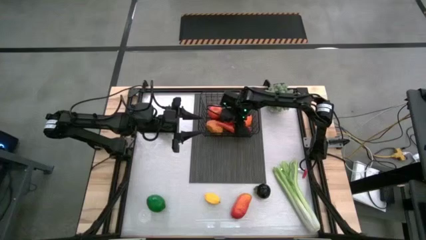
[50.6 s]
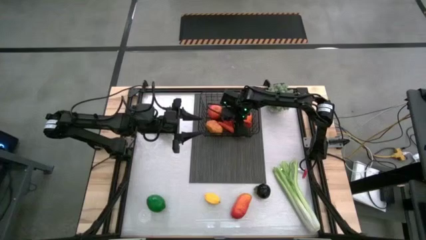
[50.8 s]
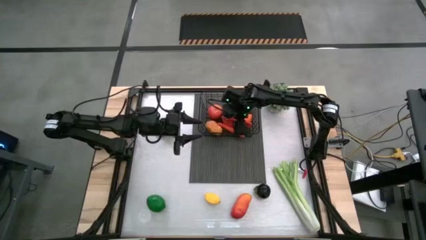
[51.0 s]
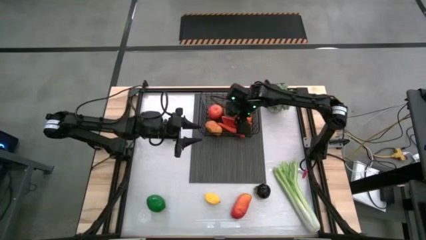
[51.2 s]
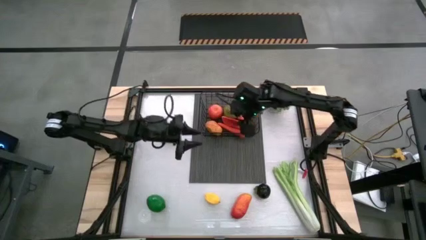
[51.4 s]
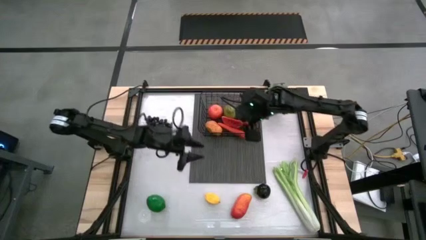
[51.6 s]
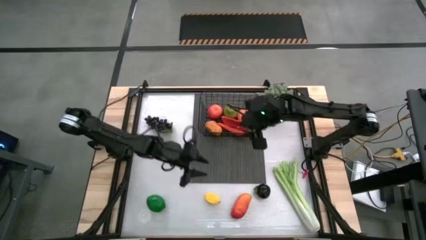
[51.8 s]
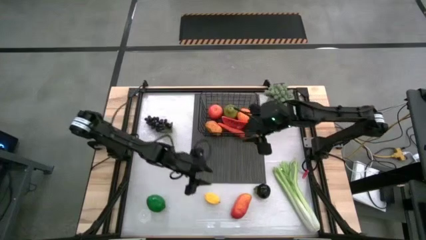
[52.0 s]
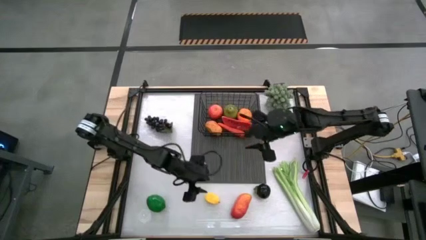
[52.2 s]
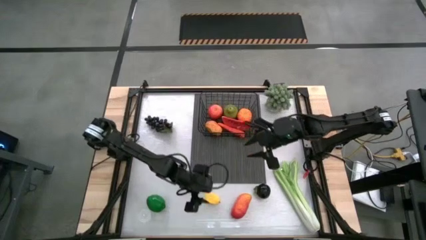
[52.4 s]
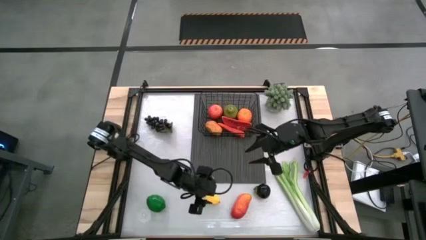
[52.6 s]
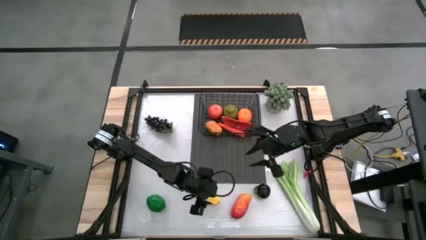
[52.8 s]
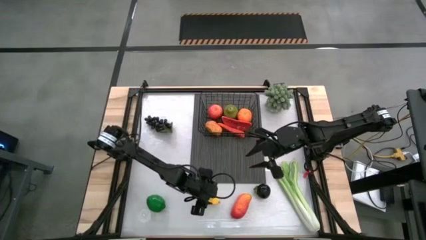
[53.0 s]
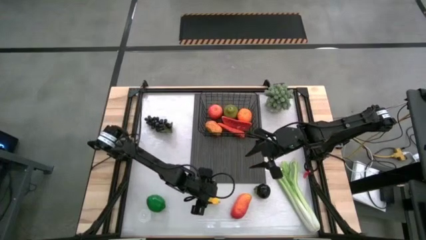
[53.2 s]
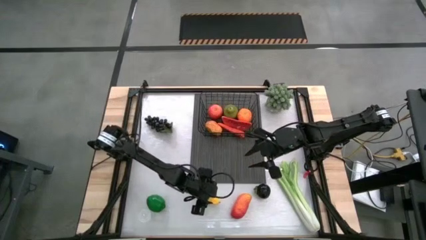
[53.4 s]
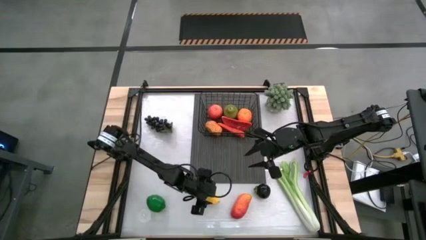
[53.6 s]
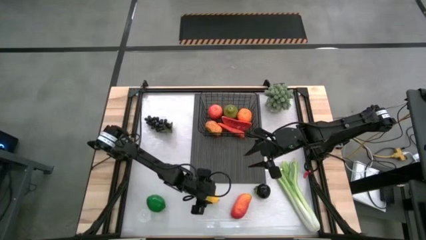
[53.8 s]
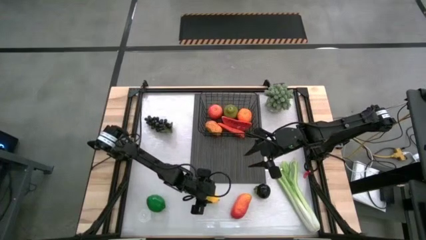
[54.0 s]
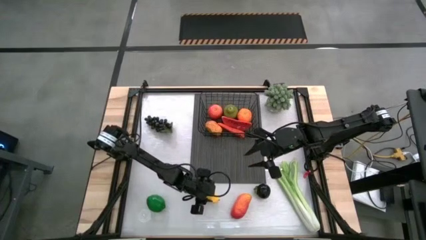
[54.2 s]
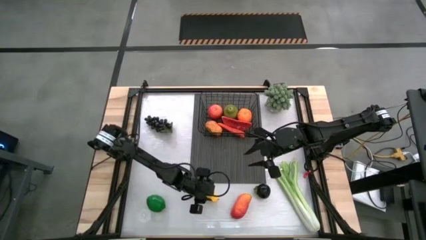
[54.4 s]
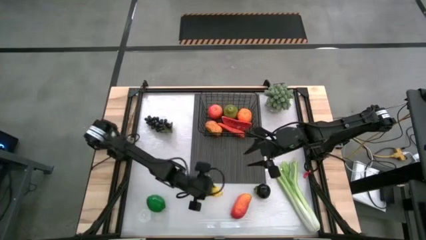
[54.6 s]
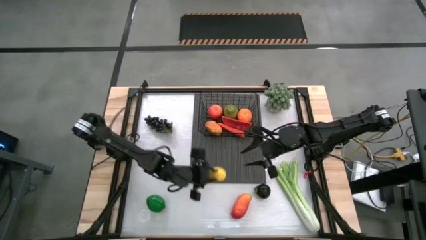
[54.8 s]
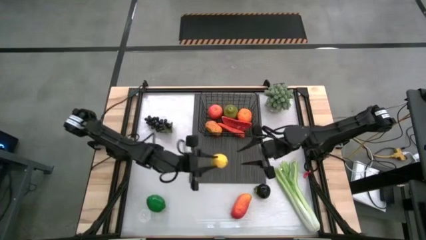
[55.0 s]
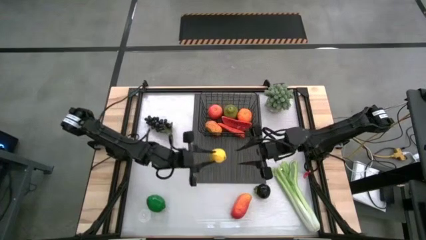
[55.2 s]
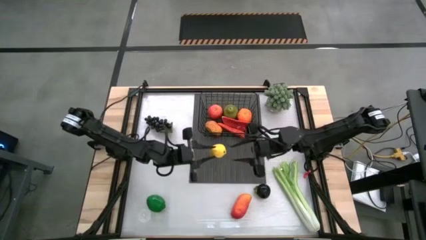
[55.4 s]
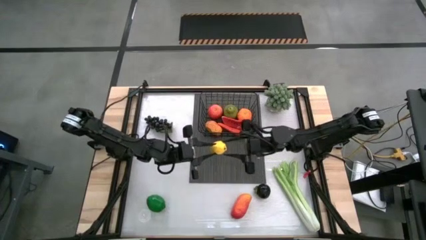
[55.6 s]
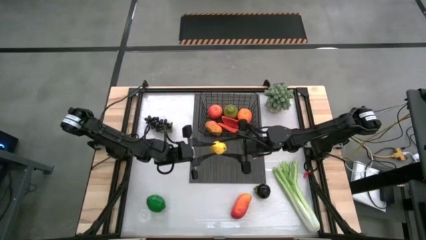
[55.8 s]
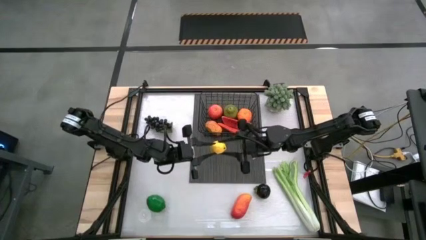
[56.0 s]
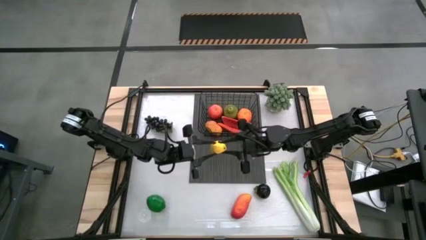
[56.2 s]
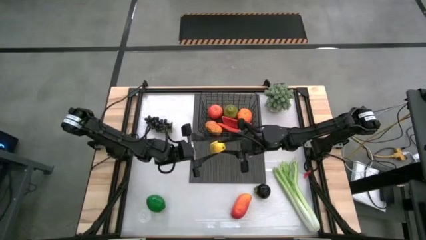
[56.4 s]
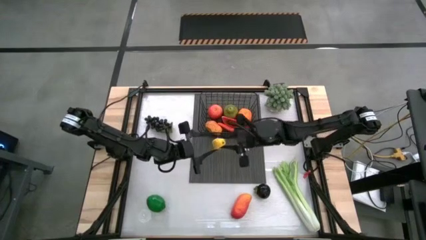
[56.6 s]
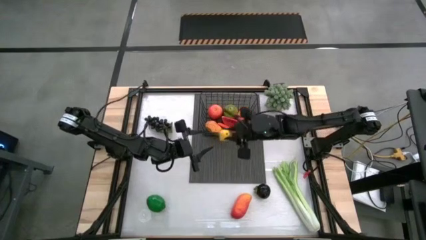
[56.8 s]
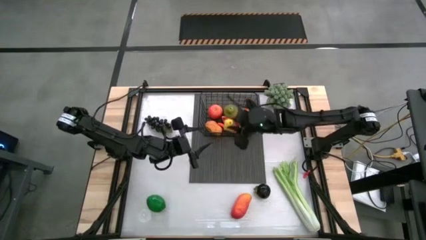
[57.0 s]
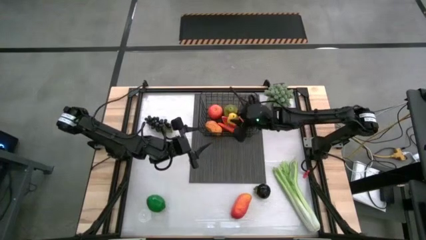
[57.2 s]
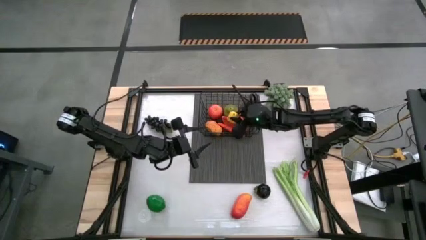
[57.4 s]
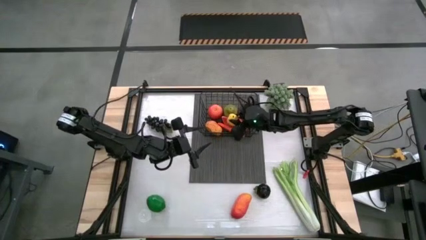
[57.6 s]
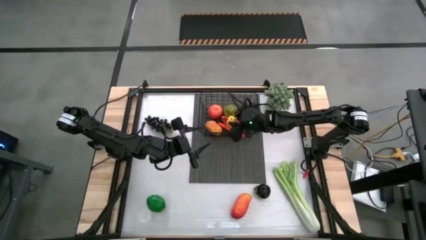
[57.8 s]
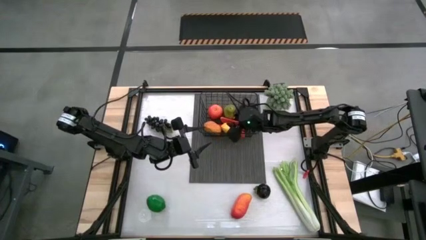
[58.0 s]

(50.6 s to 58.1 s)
Task: Build produce basket
Put the lemon into the wire basket

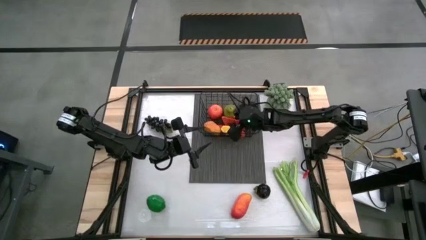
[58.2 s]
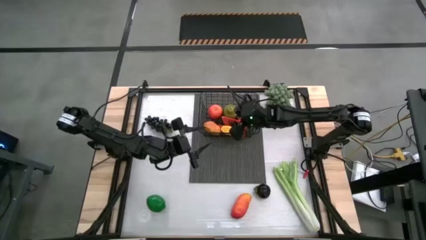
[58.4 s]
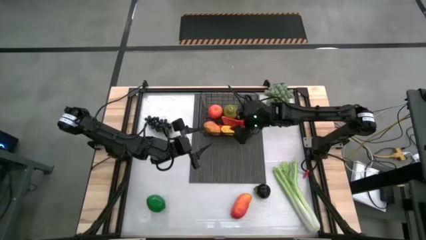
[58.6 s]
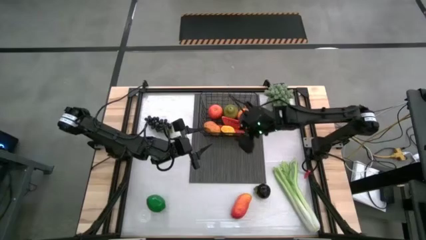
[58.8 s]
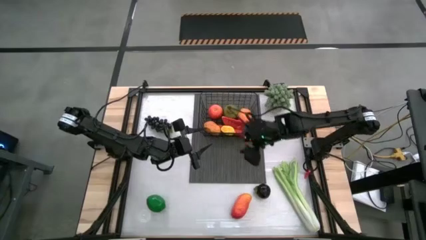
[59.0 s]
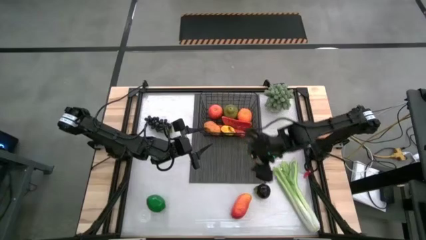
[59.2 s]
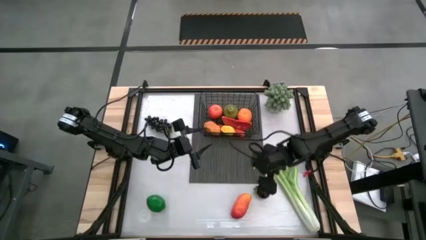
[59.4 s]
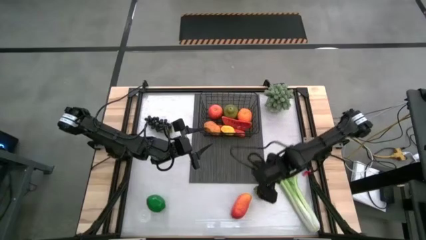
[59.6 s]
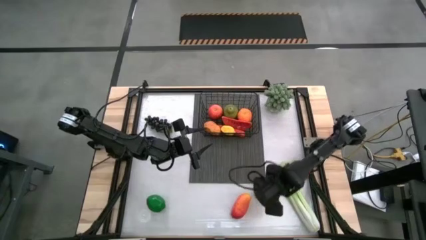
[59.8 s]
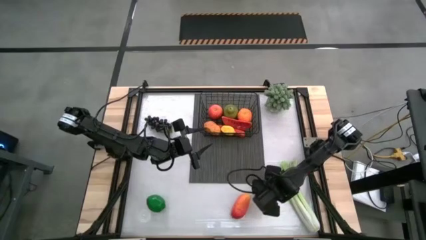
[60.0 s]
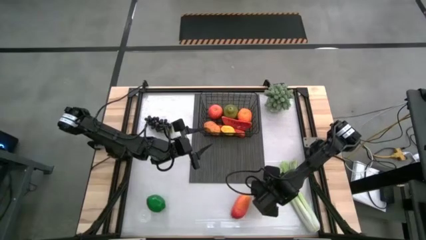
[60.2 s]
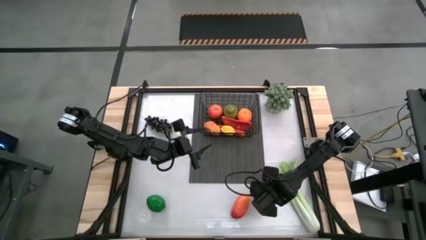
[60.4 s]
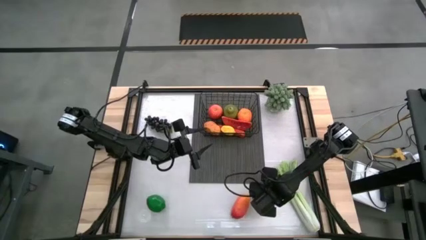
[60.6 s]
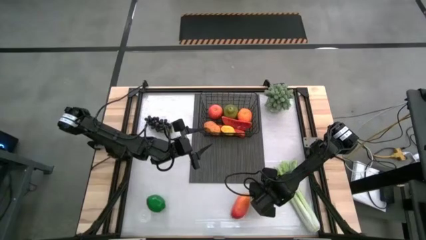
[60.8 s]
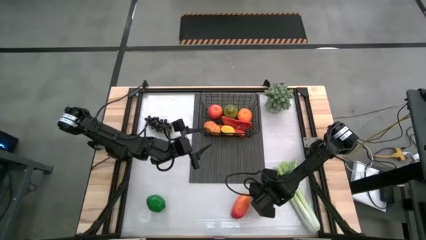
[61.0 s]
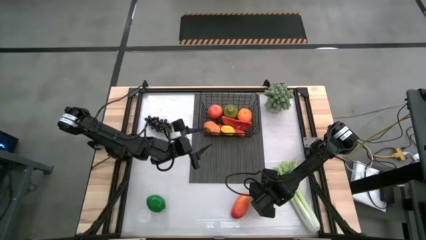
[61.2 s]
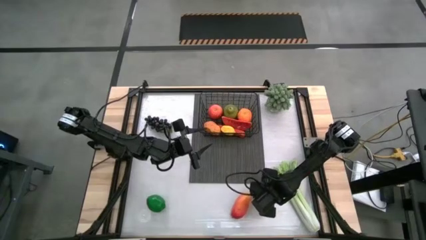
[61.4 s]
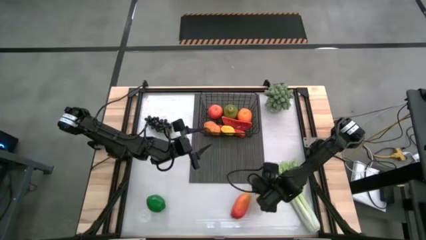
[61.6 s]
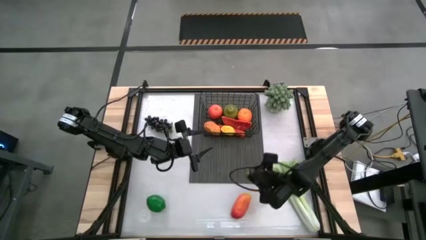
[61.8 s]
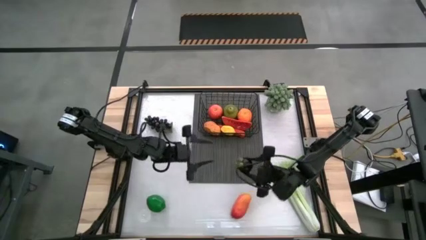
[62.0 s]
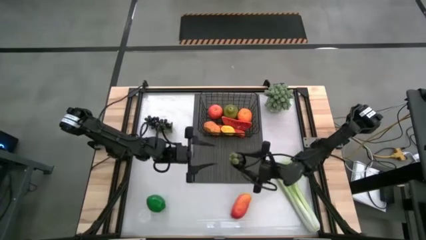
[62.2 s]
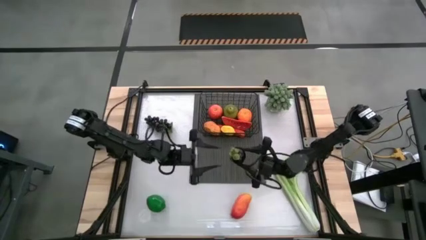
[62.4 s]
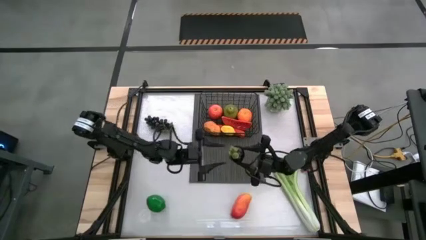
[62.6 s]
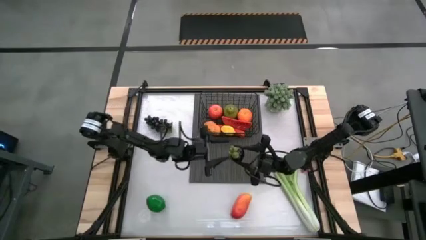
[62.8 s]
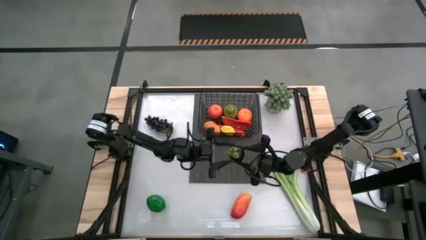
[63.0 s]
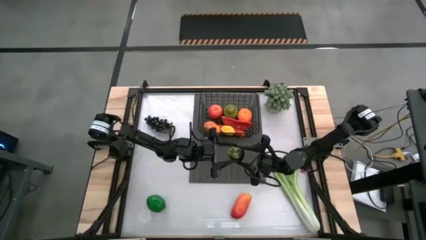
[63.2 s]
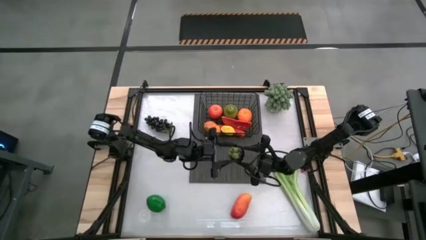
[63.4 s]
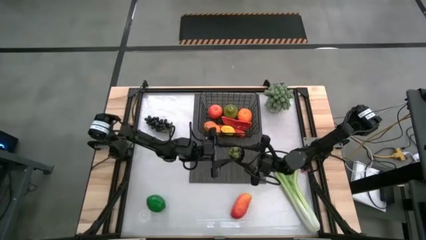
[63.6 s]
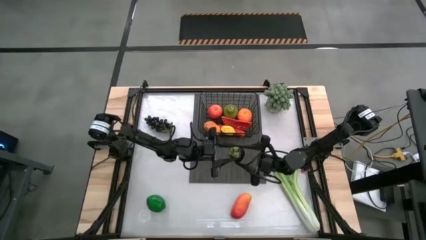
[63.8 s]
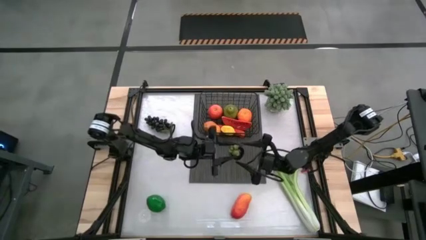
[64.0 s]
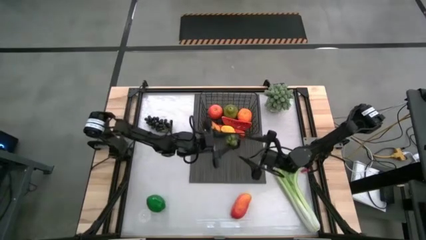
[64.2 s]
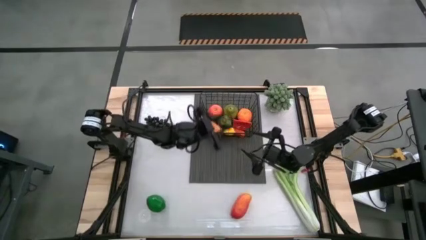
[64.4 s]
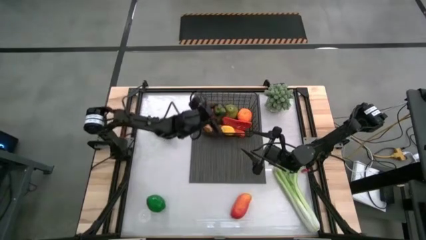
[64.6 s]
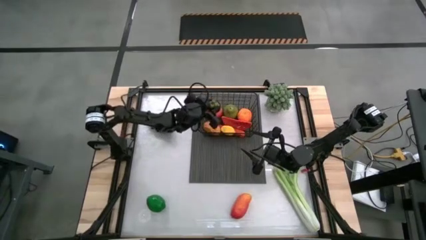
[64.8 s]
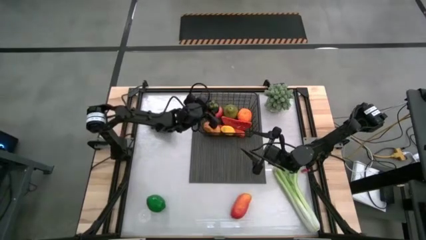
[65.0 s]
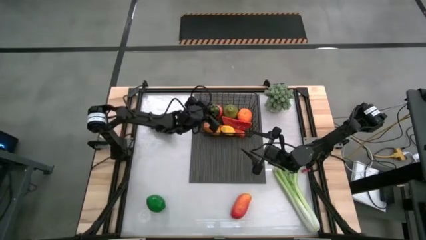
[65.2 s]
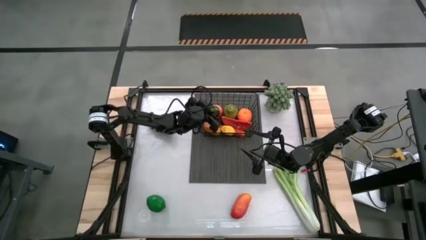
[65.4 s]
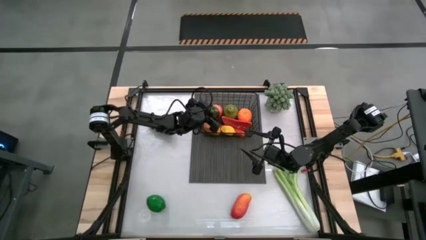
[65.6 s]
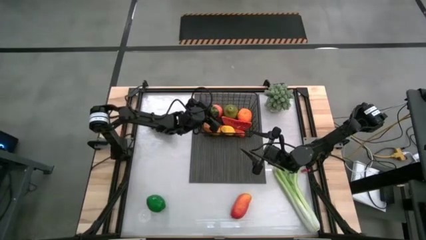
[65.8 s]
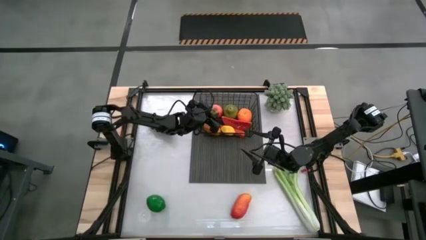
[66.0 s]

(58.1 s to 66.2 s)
Put the plum into the wire basket

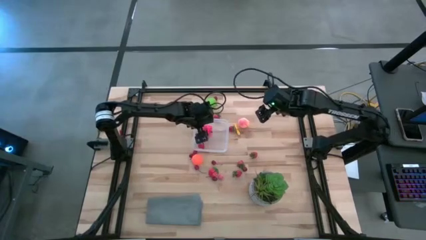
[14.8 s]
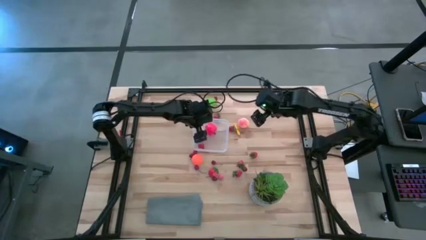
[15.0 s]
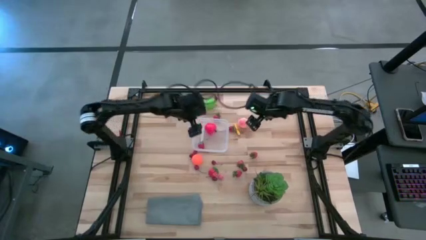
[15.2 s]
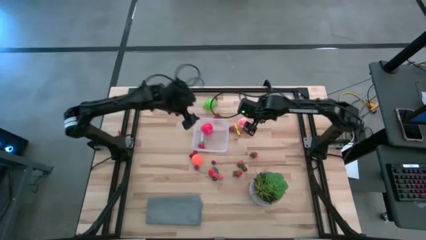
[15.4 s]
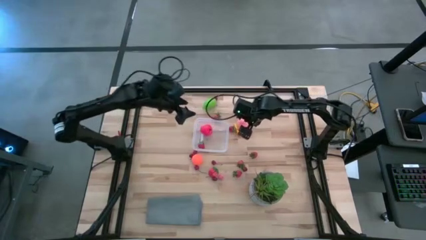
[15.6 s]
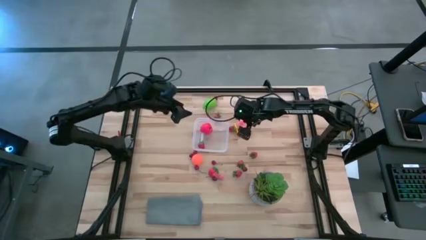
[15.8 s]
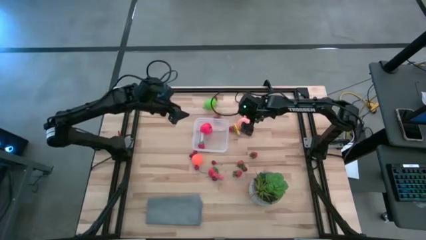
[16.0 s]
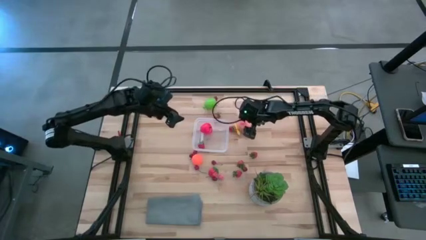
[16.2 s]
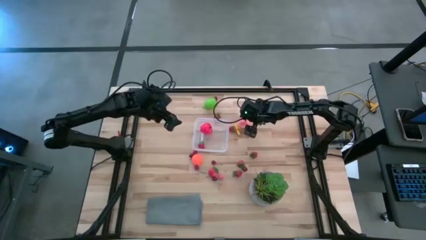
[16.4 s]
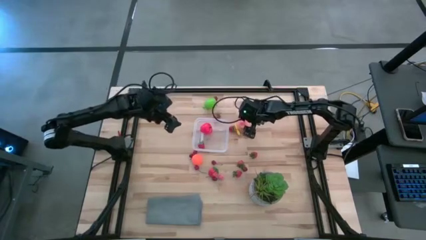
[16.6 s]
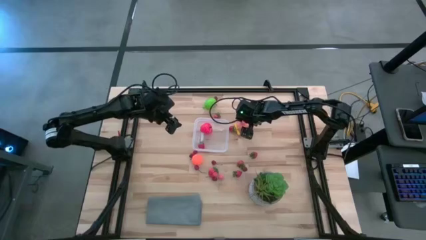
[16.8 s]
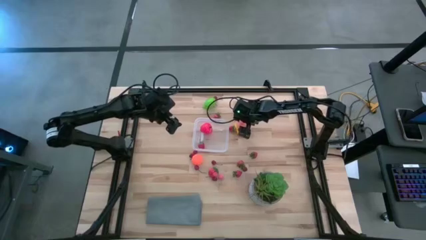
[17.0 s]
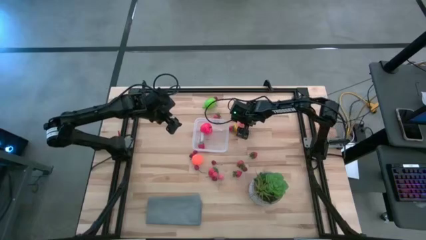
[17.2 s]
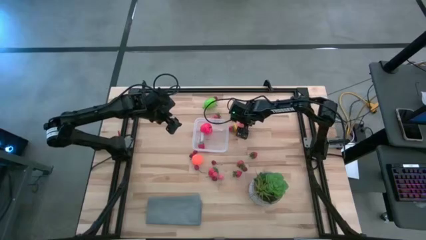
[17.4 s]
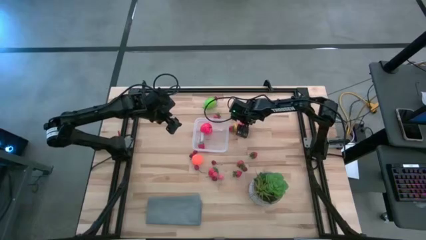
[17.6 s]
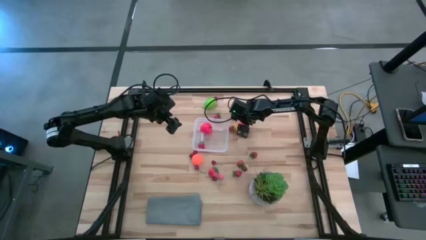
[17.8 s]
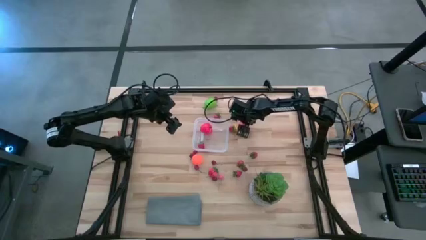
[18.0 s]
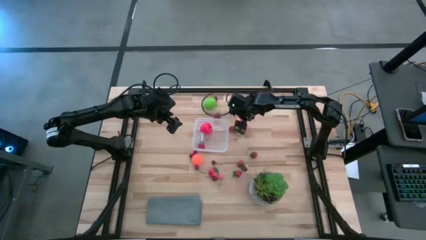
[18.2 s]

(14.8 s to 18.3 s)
Task: Pick and placing Produce into tupperware
Put the pink peach into the transparent bin
